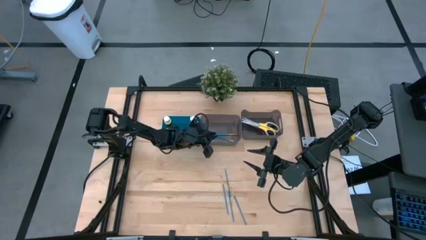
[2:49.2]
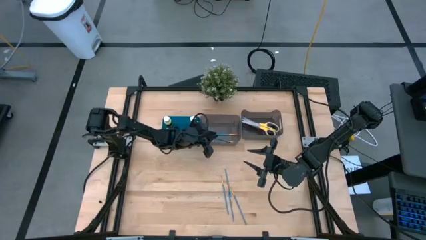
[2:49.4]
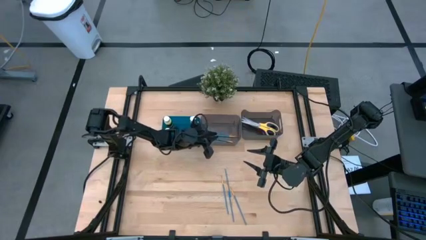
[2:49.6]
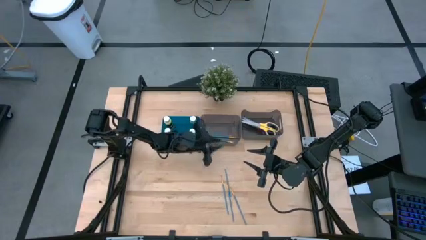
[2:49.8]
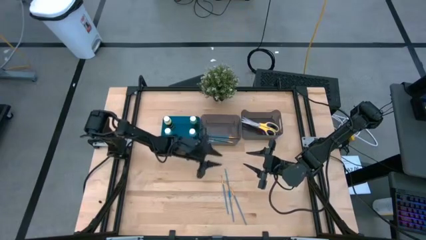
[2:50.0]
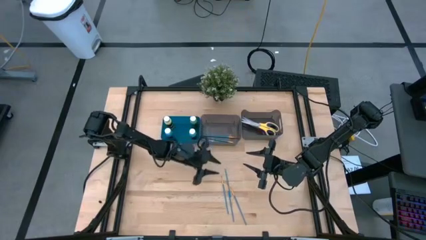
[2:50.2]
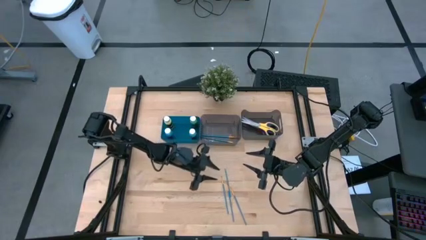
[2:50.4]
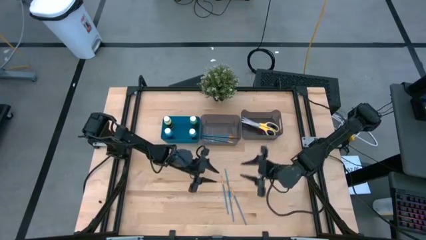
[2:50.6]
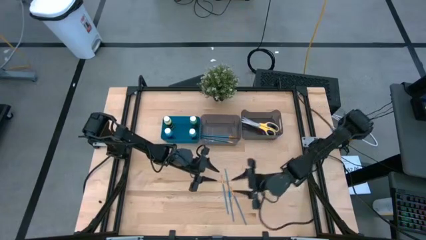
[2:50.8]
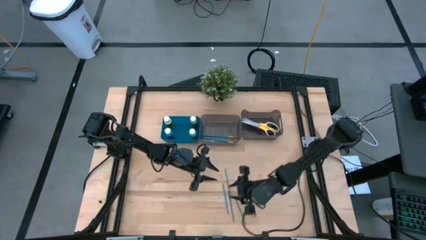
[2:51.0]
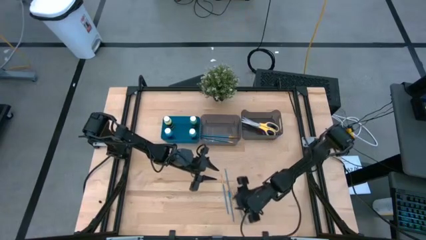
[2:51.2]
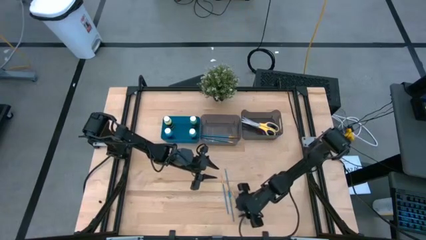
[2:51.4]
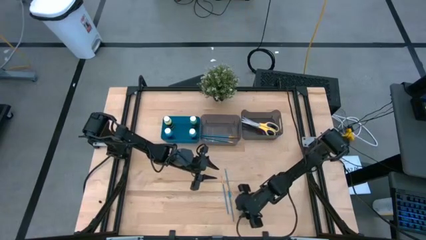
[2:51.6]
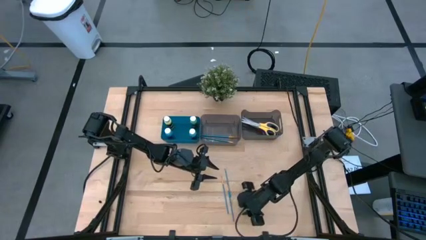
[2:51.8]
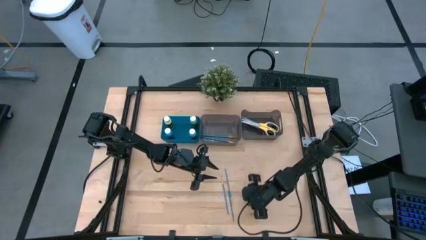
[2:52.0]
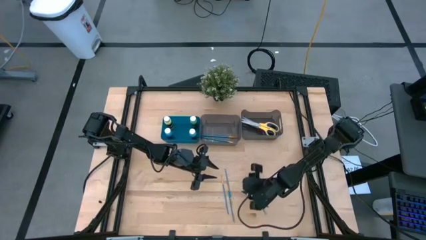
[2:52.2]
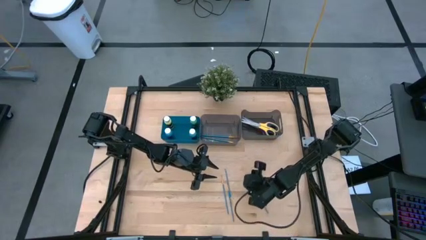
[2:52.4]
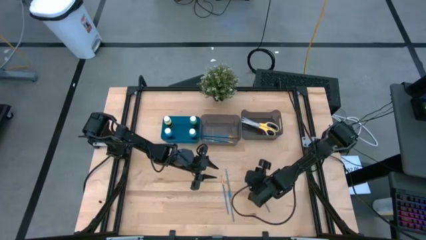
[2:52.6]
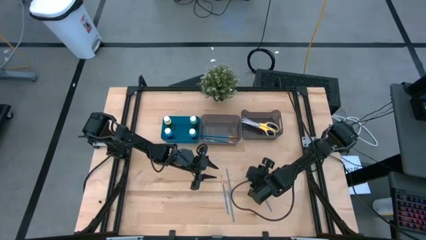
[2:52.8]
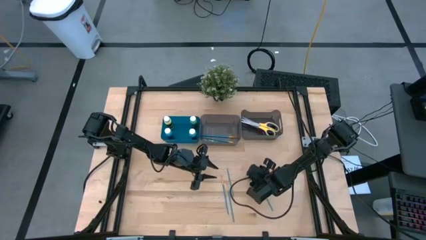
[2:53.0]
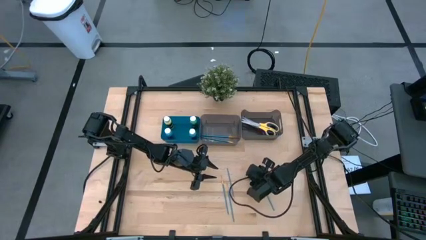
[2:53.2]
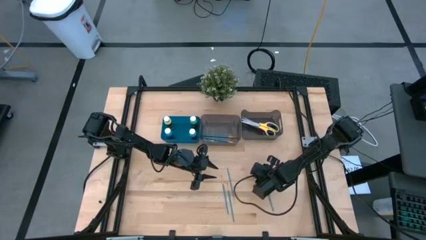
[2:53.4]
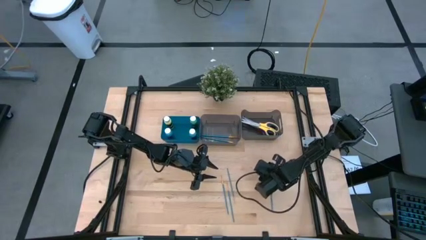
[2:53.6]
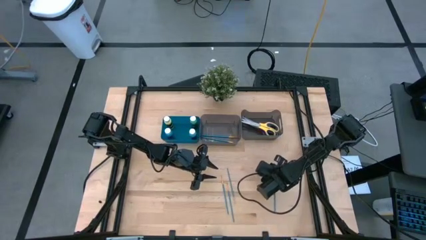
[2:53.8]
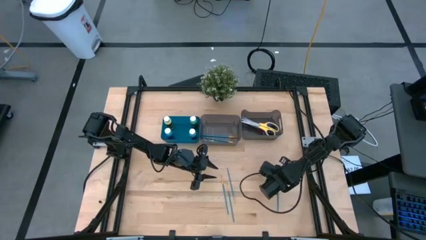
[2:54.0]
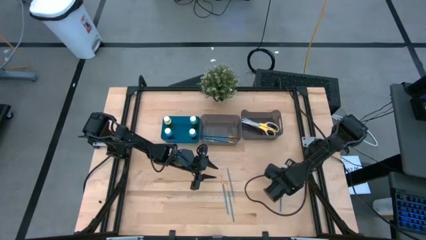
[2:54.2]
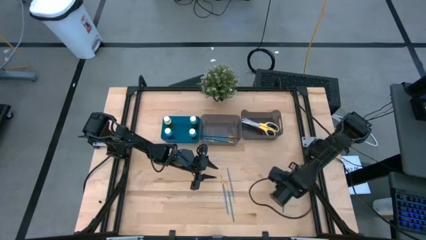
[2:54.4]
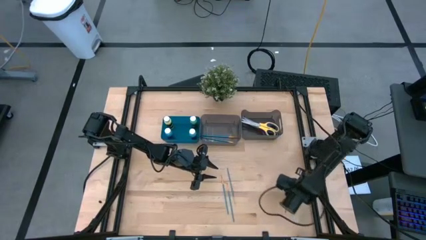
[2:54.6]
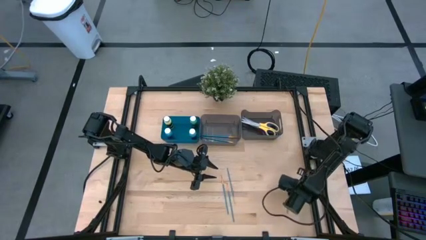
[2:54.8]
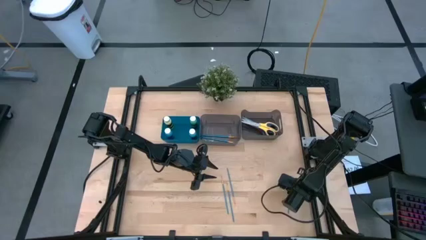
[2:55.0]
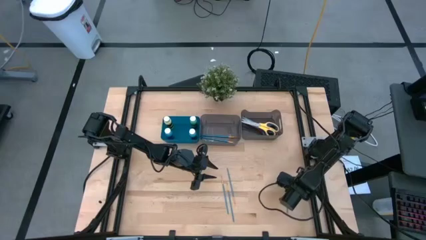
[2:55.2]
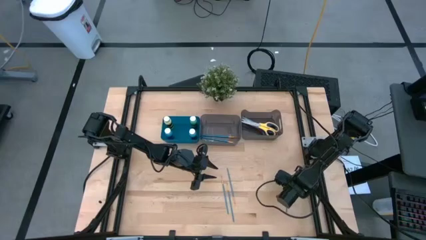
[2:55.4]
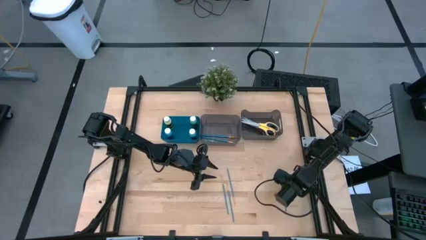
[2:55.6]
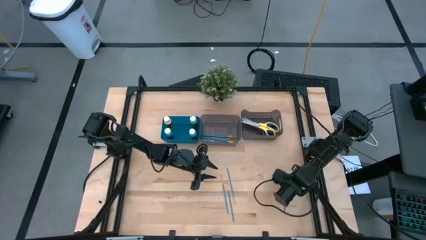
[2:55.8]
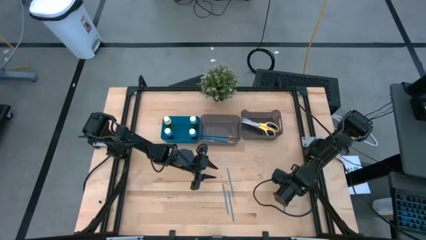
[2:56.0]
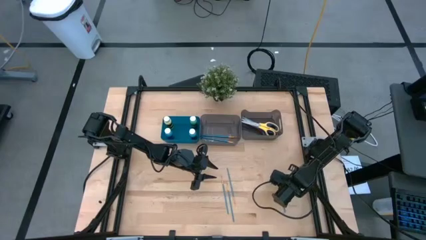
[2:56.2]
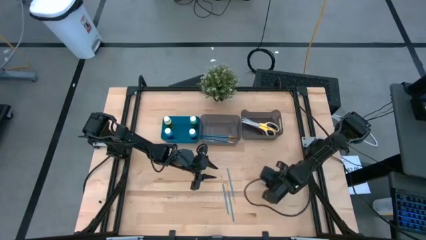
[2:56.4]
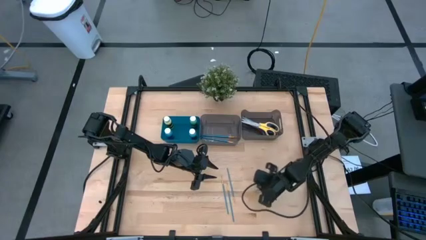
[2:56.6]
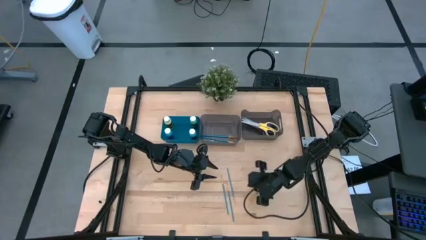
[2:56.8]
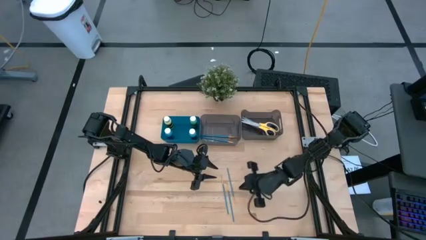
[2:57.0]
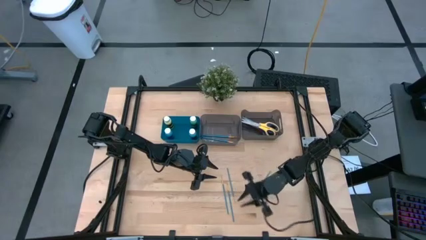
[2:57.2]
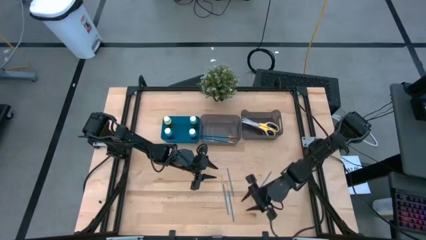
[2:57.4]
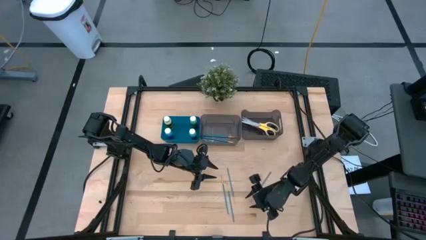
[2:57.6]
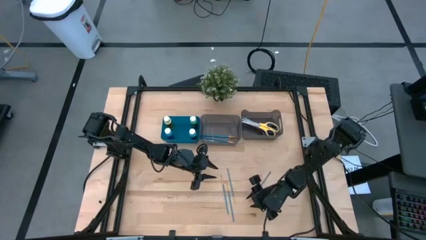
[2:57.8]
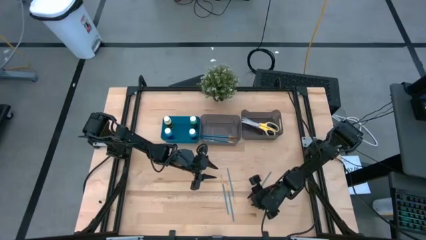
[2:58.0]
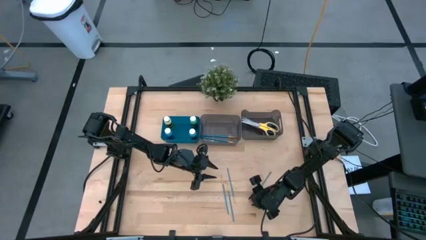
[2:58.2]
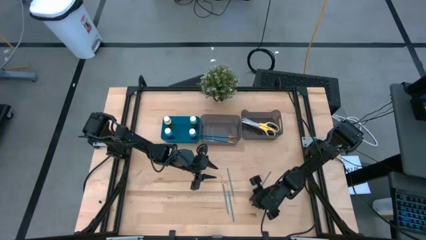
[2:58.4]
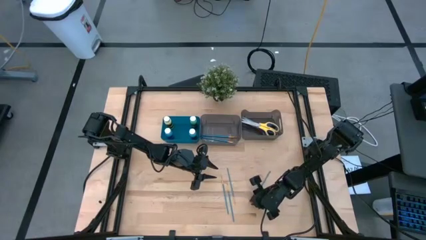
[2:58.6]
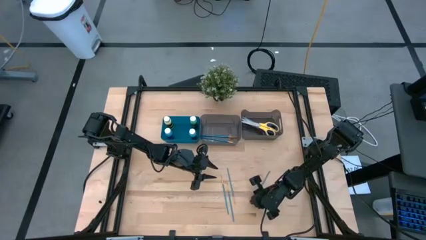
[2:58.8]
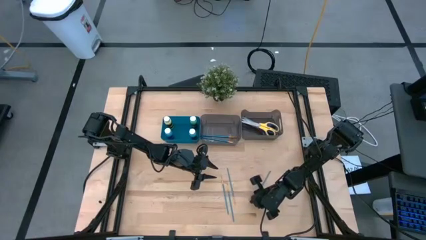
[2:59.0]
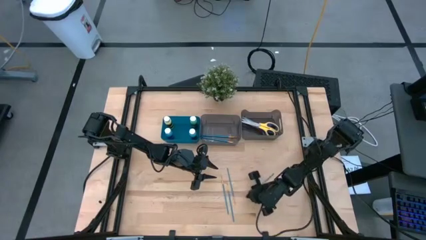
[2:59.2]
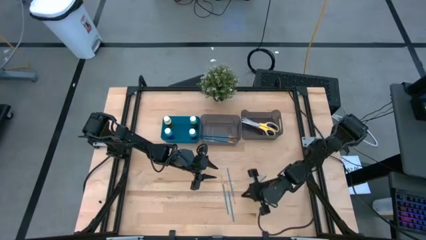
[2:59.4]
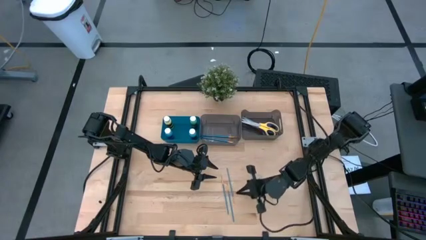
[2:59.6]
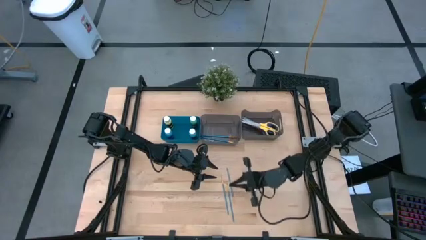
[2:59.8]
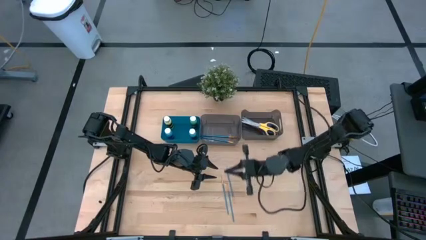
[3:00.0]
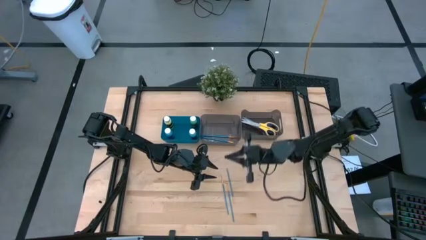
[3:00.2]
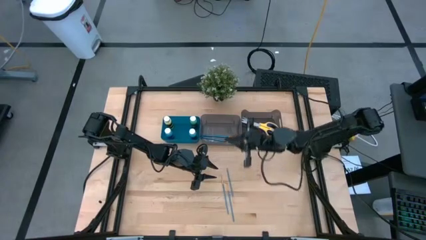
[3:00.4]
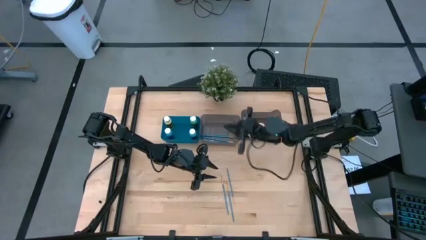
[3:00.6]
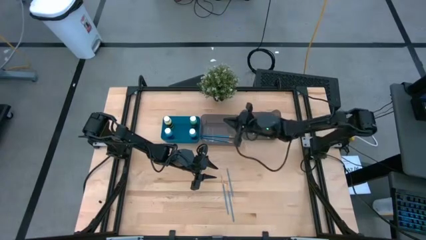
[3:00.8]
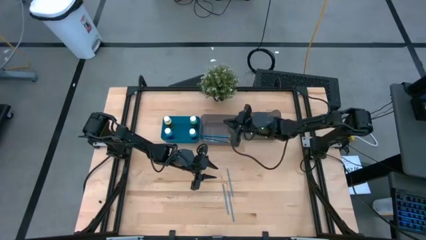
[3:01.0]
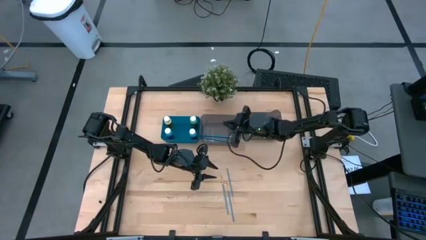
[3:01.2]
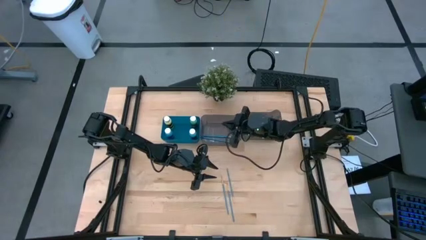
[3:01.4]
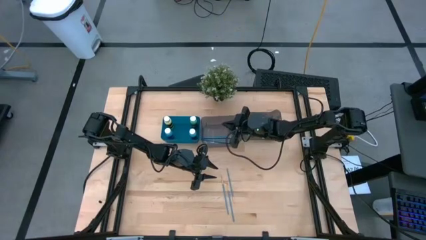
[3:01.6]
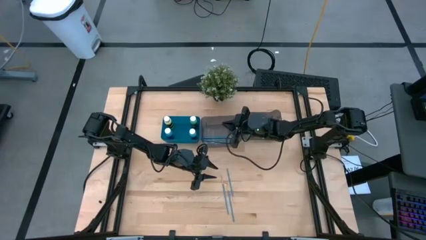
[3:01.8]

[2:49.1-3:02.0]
Task: Pick & Place Paint Supplies
Put the paint brush into the left black bin
